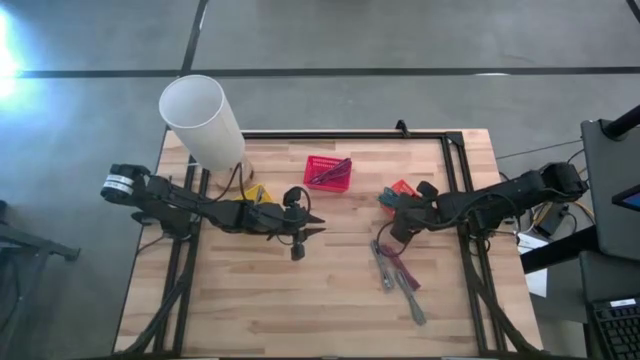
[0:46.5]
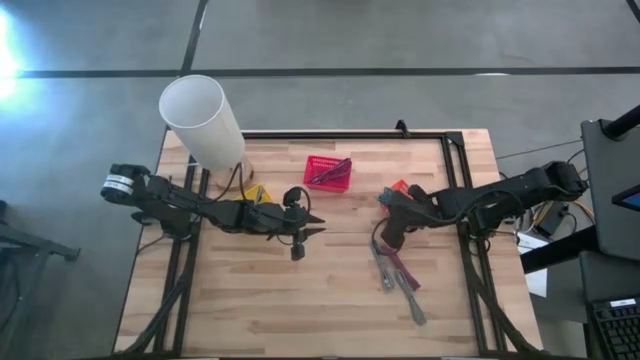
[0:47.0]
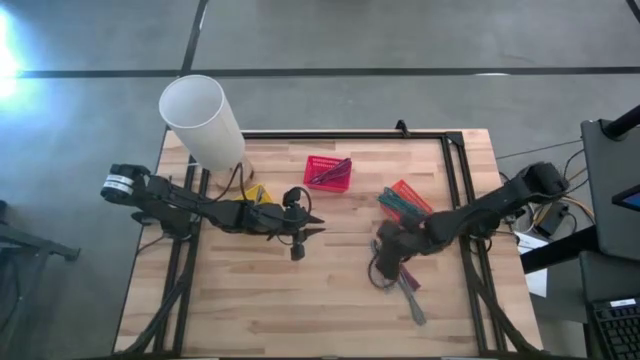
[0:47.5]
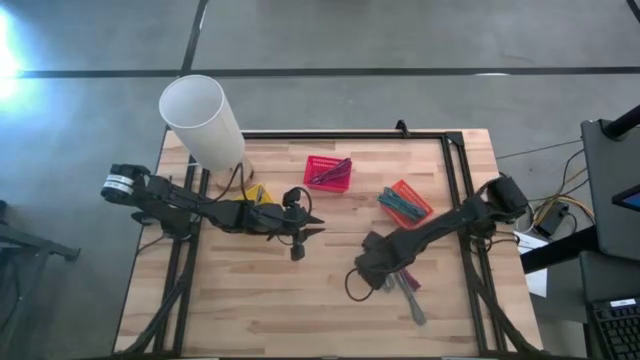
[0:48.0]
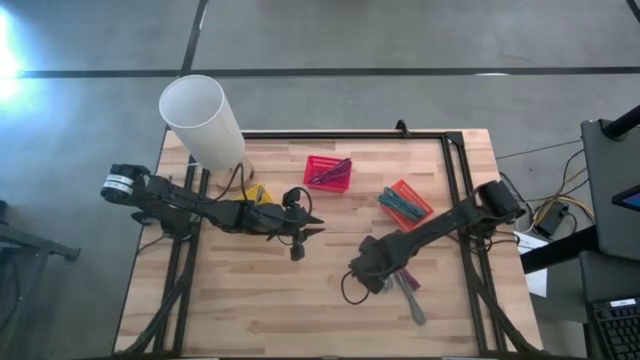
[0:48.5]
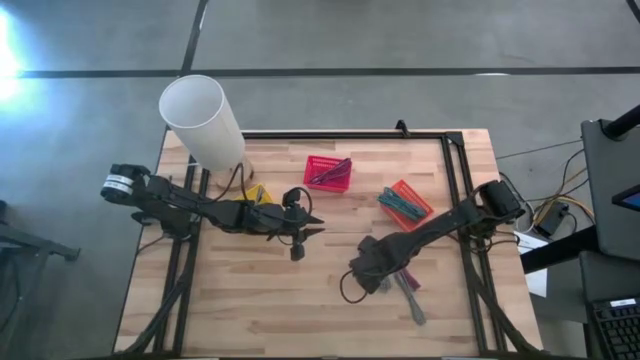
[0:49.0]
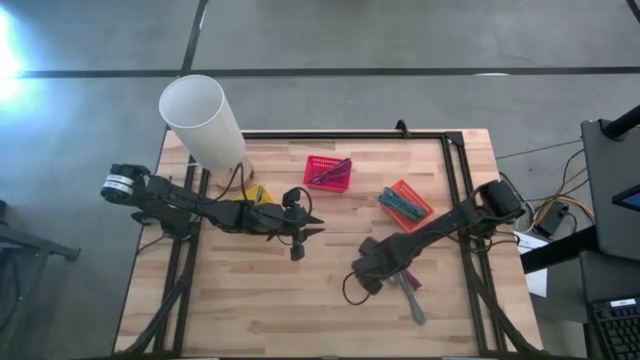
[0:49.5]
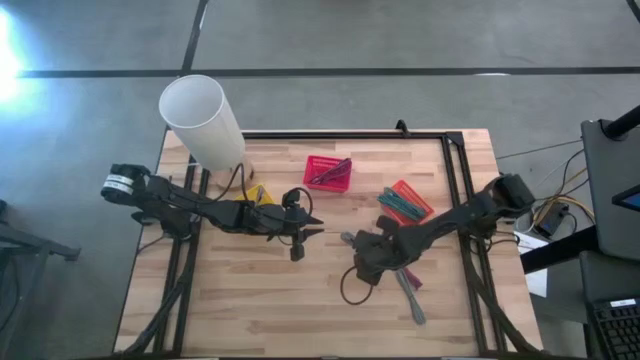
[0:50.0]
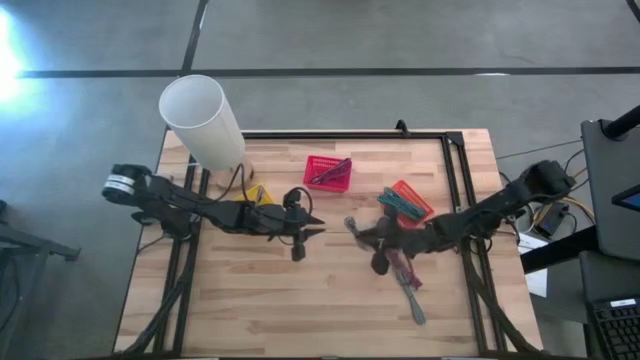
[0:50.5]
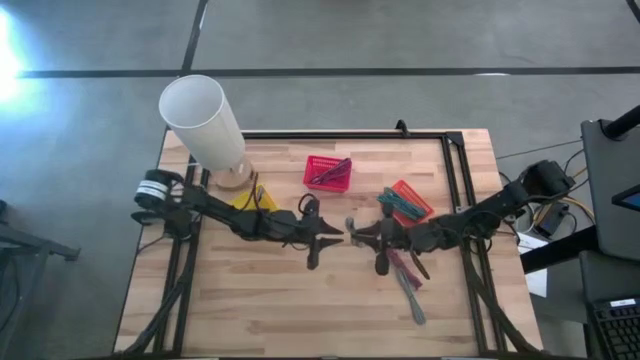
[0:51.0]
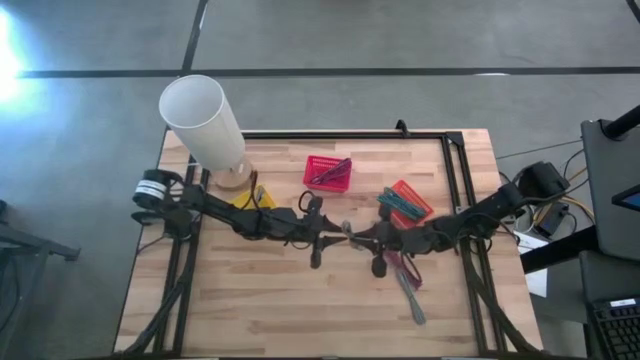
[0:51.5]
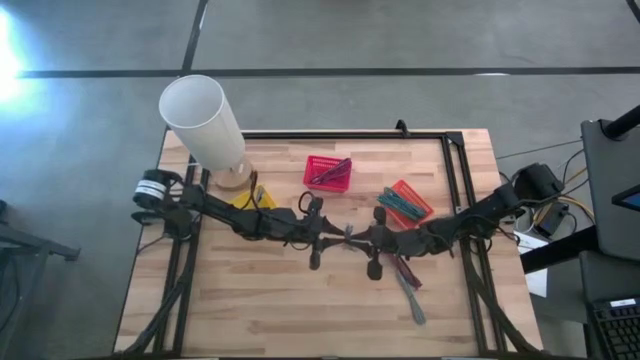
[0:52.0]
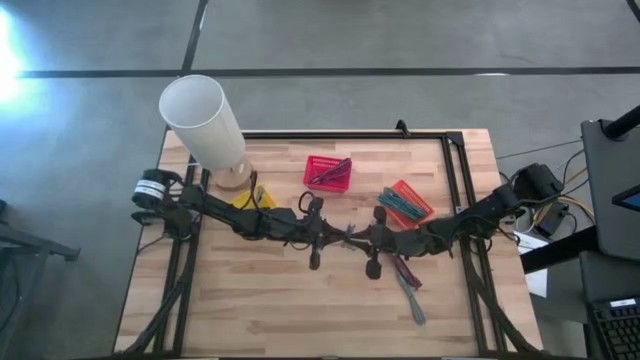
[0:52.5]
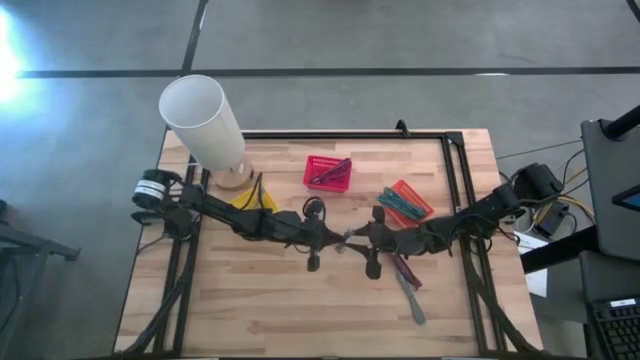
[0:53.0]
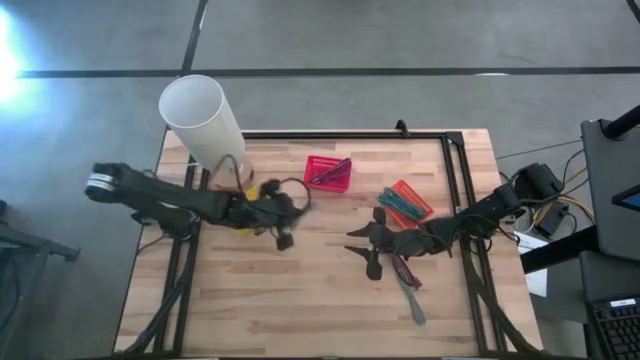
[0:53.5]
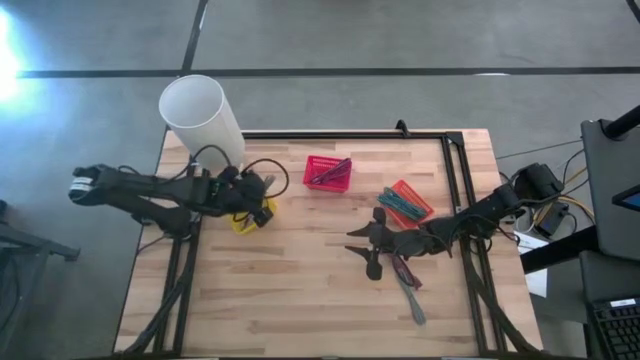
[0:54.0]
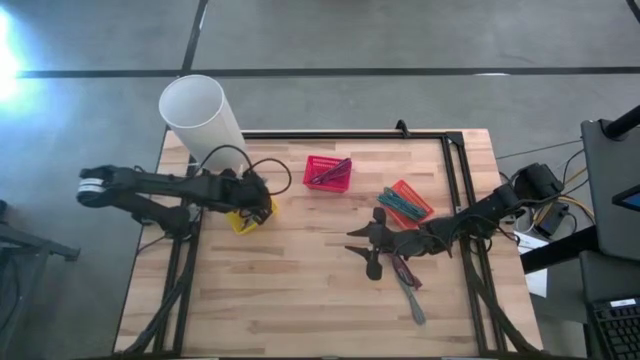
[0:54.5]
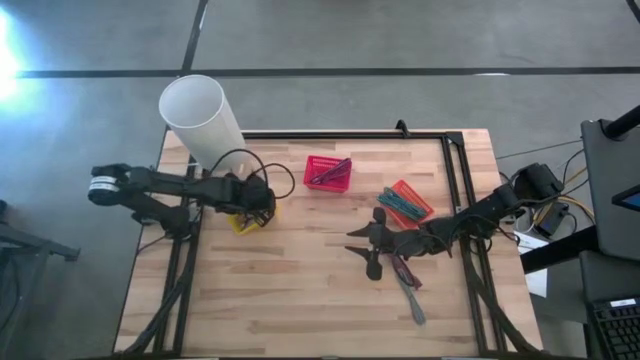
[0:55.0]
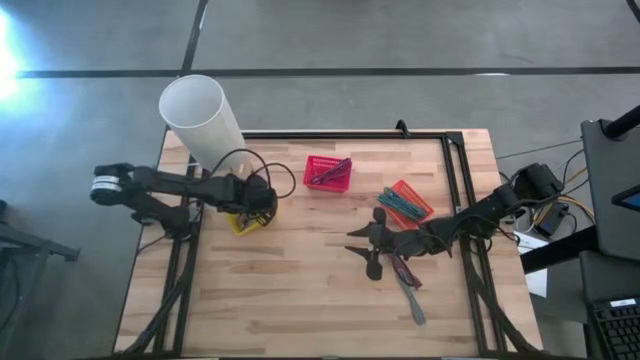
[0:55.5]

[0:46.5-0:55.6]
Task: Pick & Place USB Port
Put the left black charger cable into the yellow bin

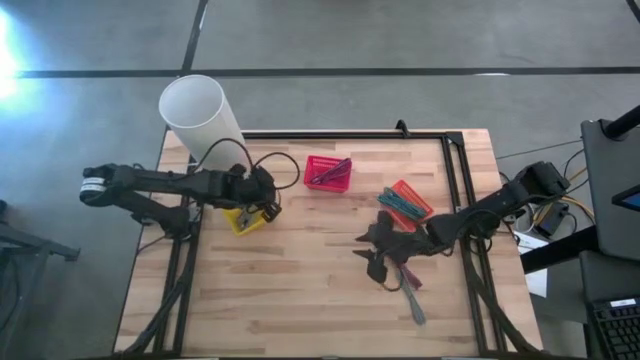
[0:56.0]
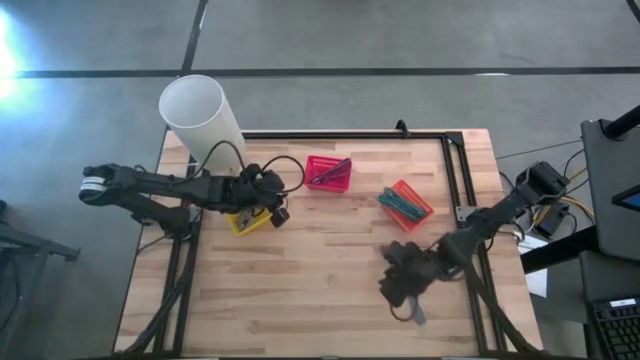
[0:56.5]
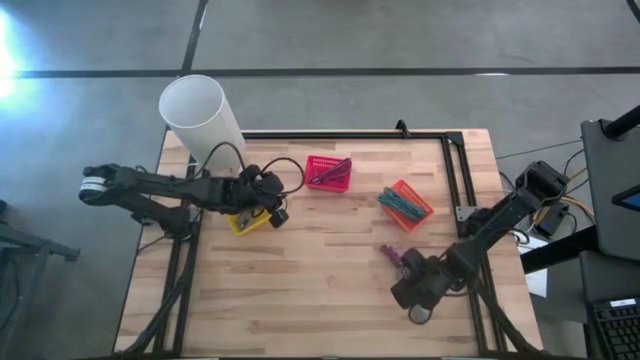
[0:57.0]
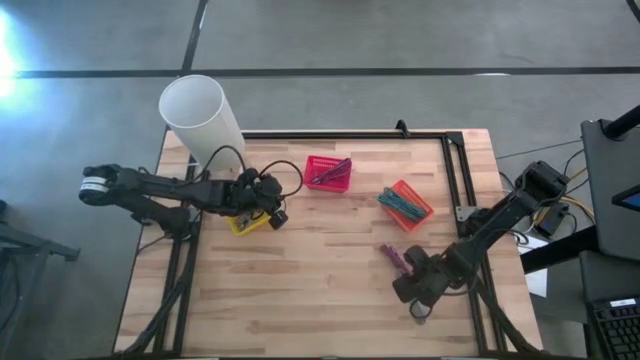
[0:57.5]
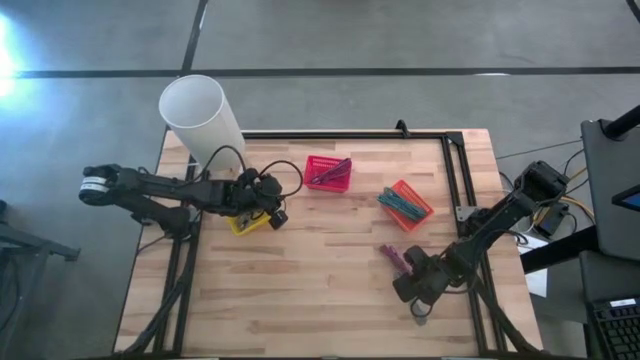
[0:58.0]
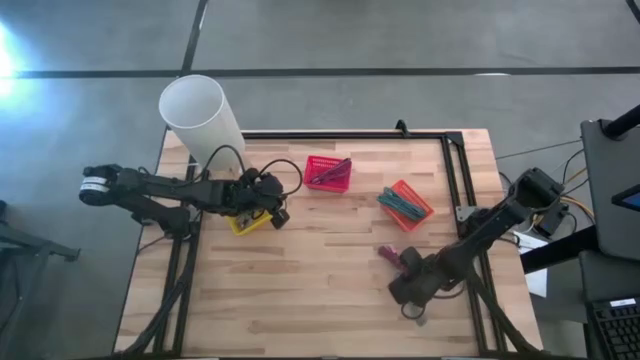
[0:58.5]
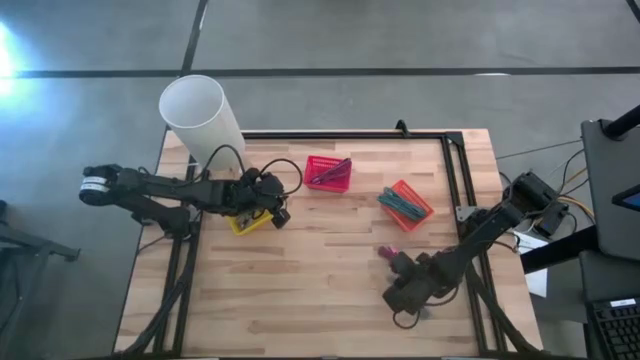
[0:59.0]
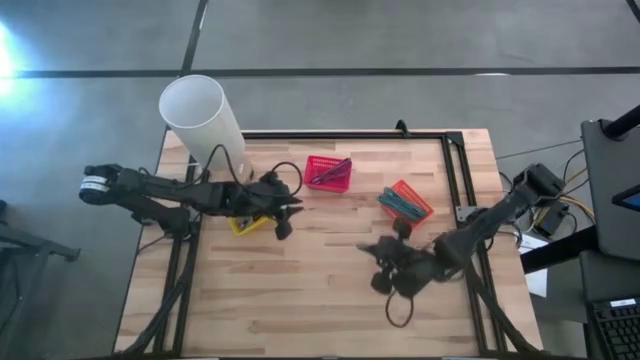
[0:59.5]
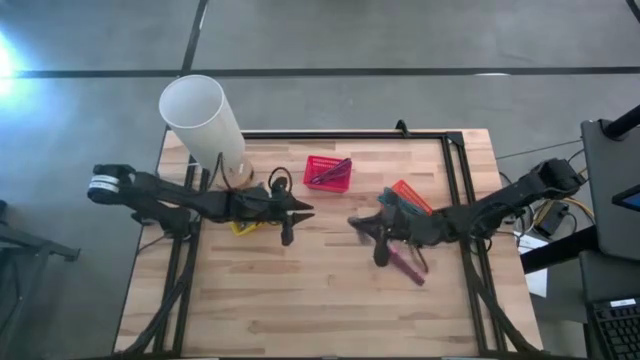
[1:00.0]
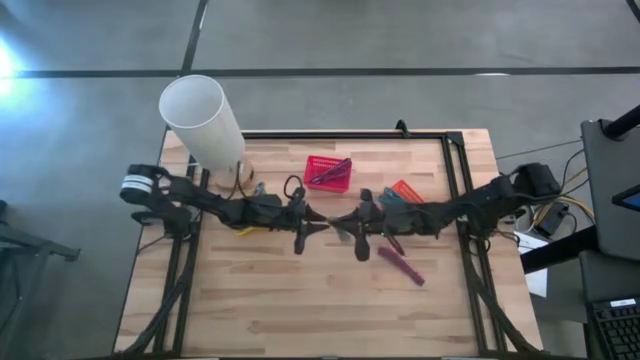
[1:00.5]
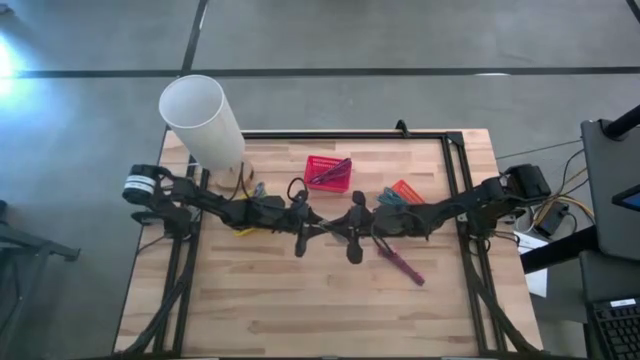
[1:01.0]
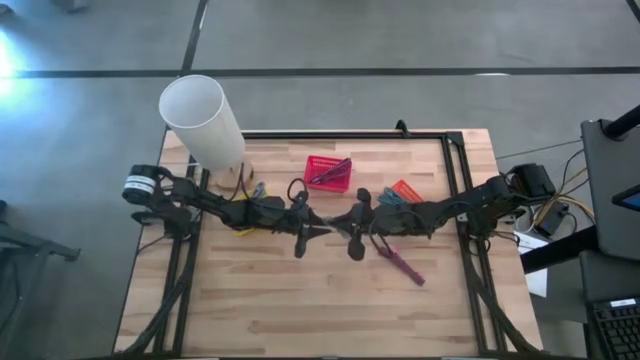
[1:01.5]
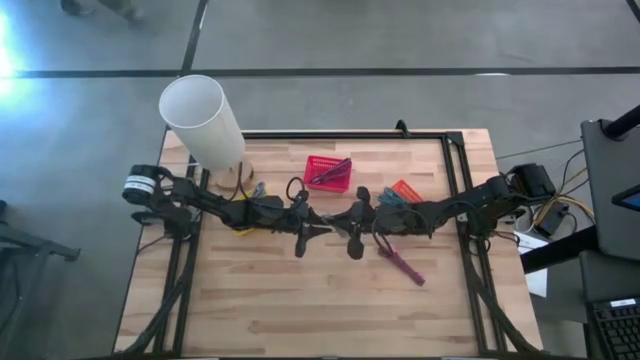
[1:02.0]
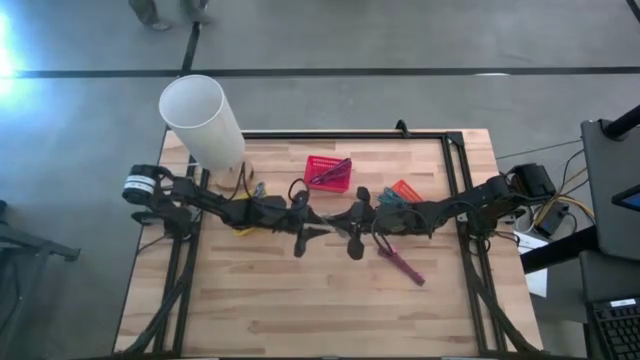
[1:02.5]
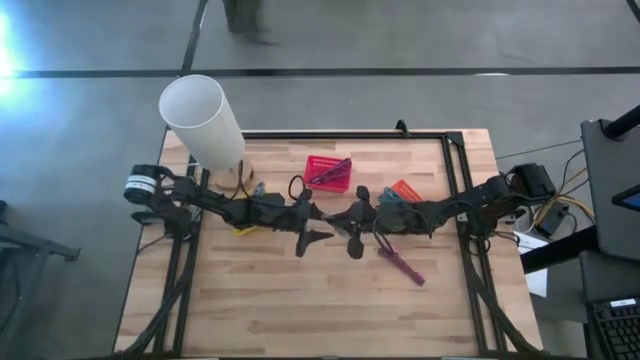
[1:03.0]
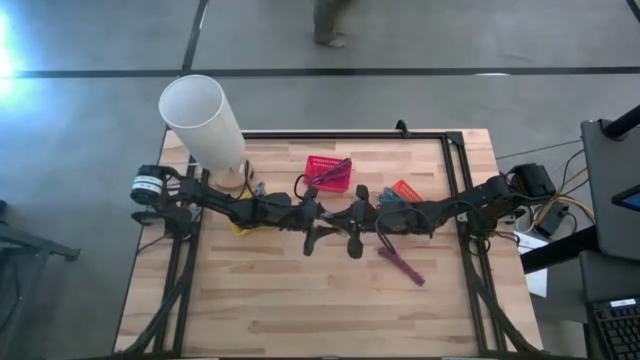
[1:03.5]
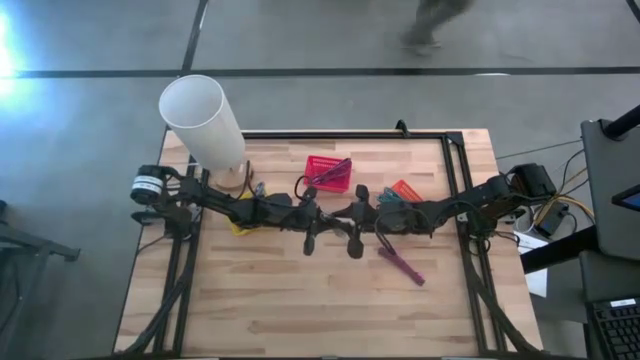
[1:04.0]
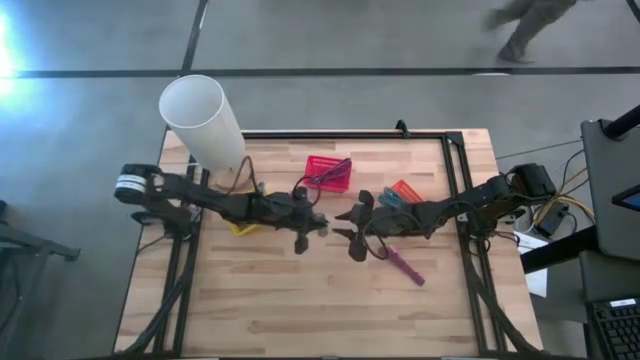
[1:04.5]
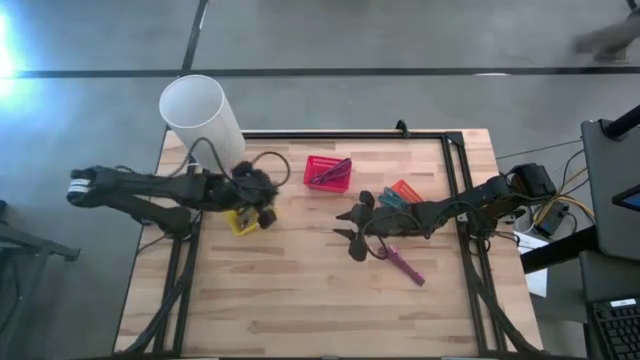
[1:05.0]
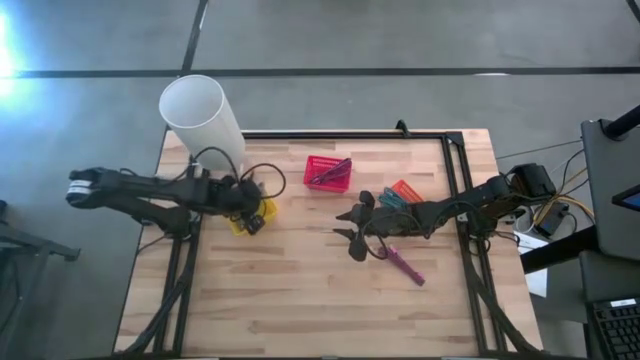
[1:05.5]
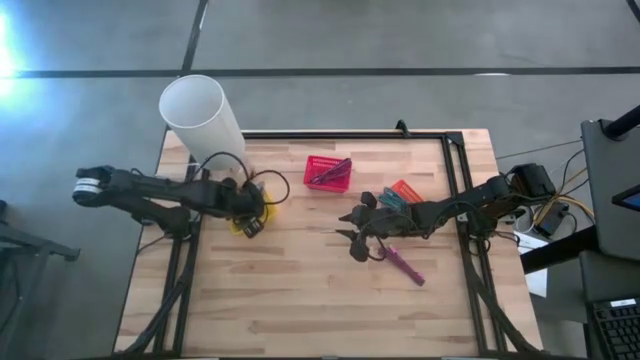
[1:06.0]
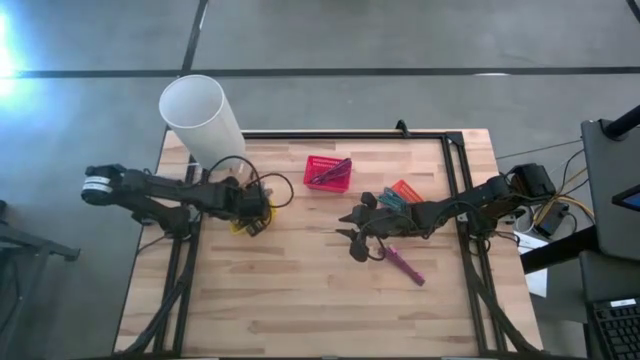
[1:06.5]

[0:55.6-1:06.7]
Put the black charger cable into the yellow bin

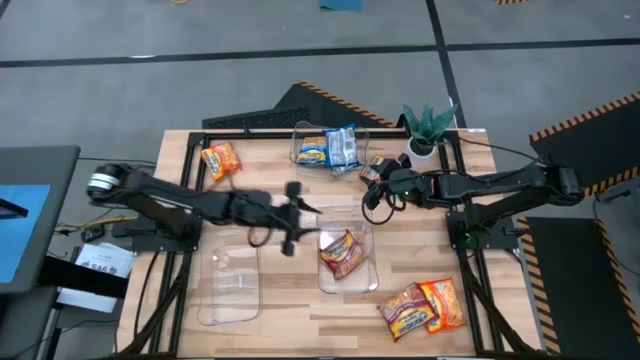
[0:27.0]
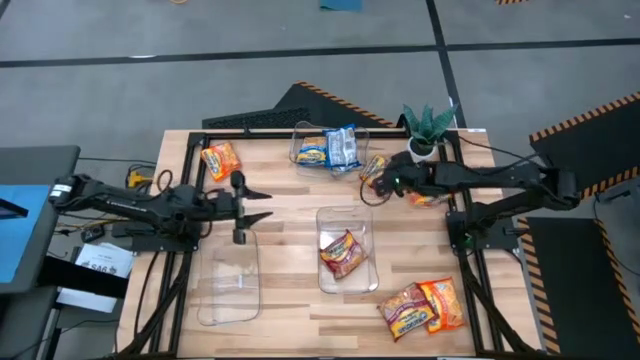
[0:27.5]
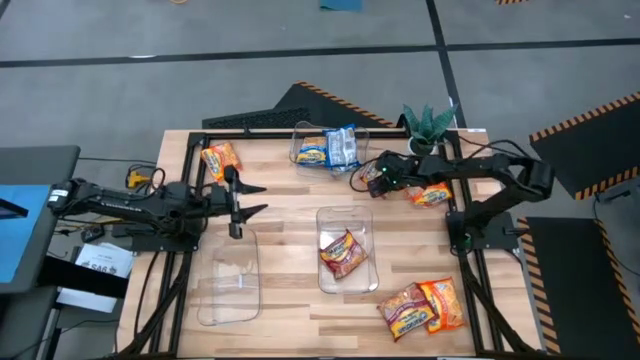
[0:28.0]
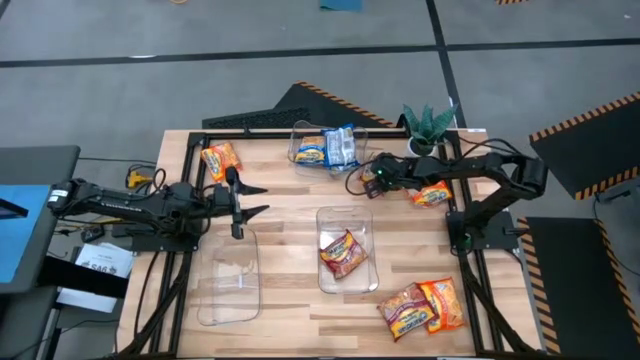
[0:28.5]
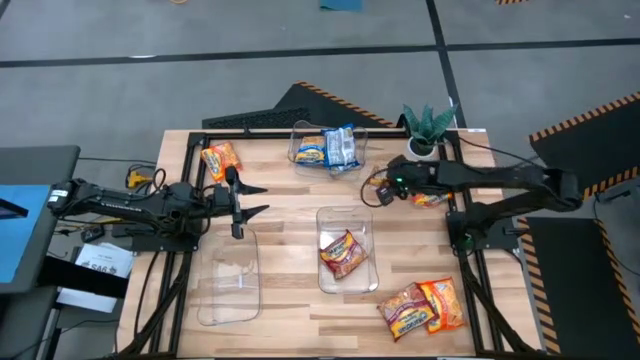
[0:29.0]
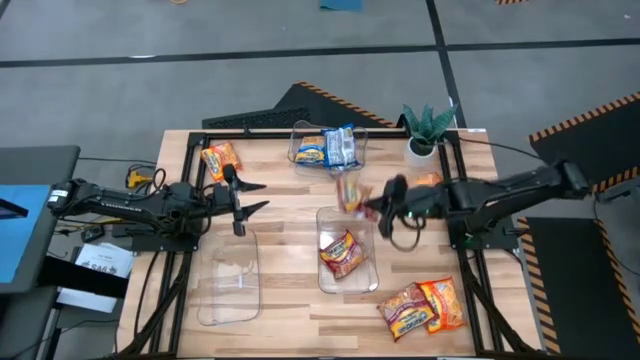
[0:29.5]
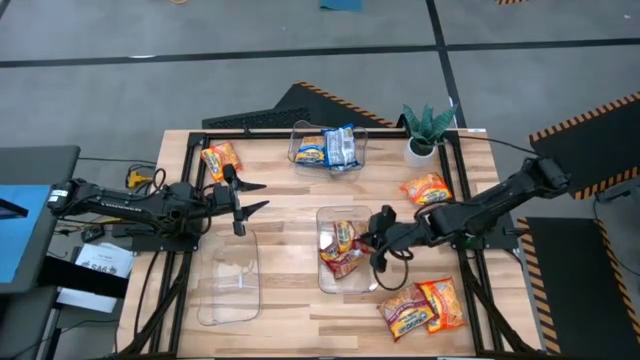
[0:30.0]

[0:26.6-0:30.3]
Task: Sort Maruchan noodles
Put the top red noodle pack into the right transparent bin
